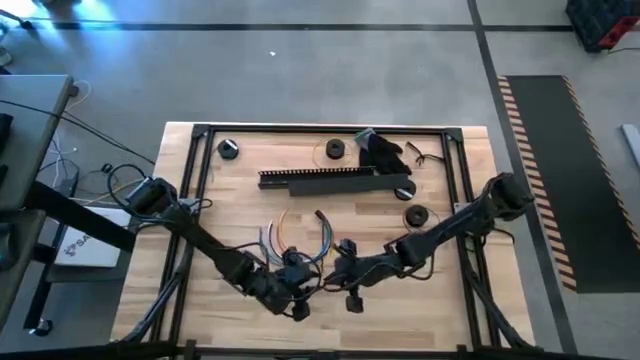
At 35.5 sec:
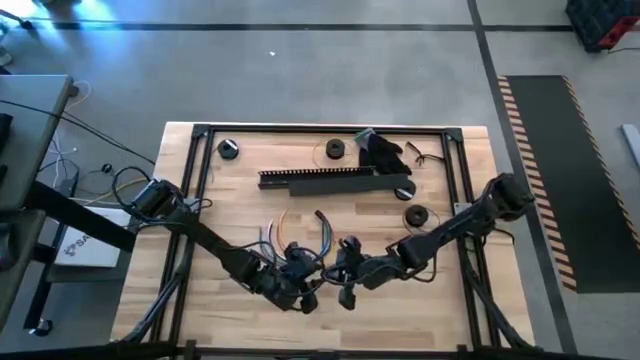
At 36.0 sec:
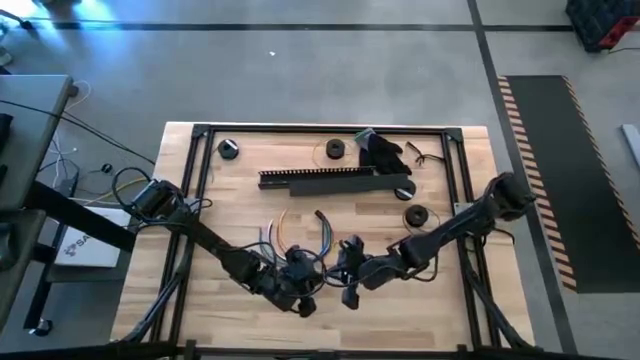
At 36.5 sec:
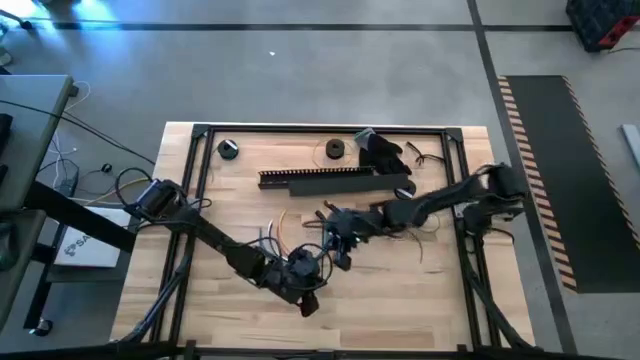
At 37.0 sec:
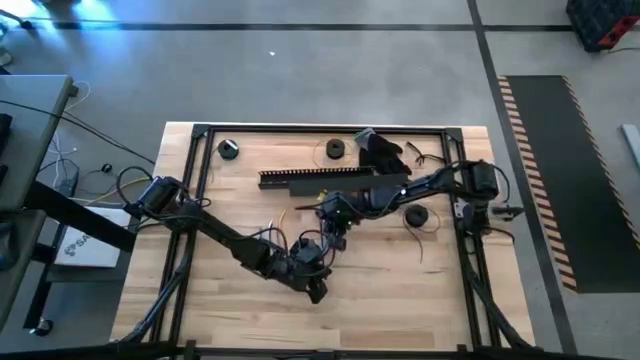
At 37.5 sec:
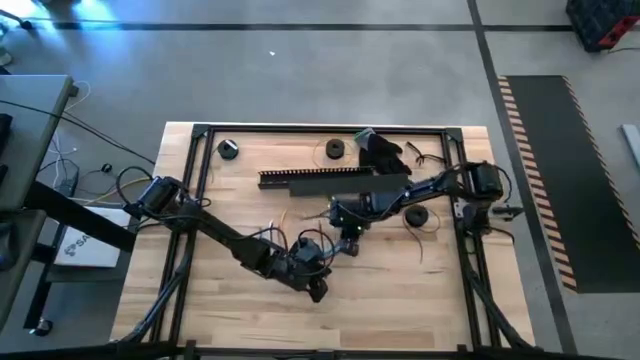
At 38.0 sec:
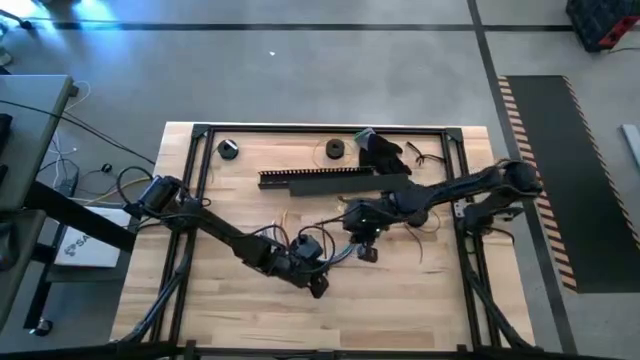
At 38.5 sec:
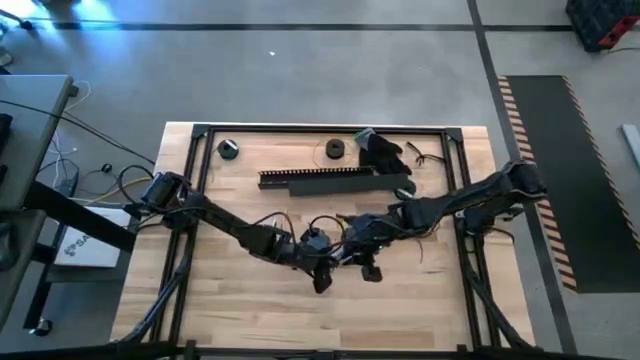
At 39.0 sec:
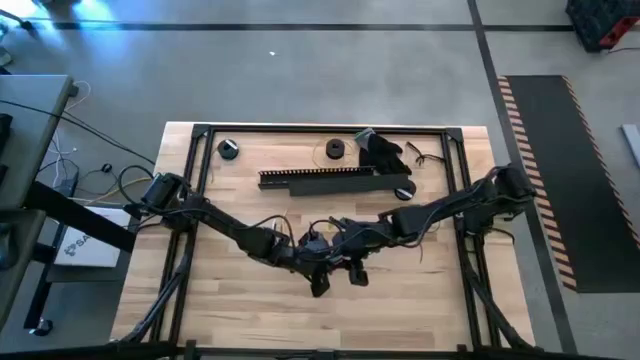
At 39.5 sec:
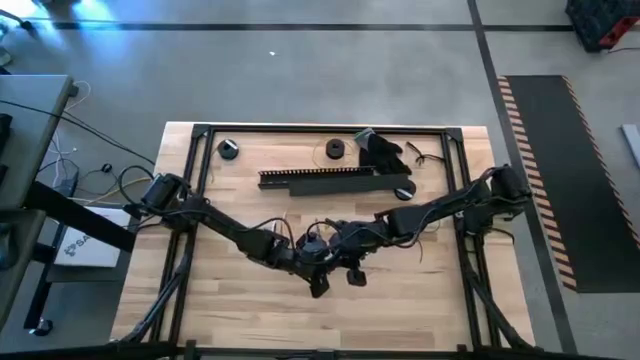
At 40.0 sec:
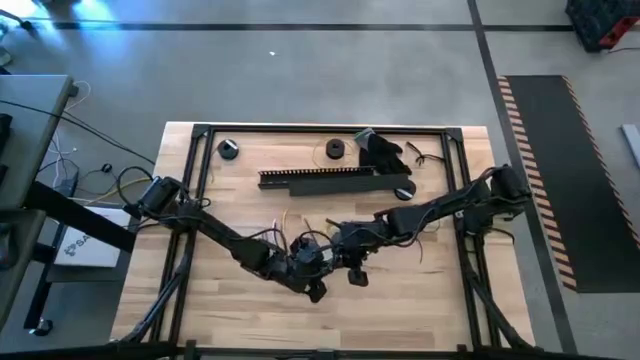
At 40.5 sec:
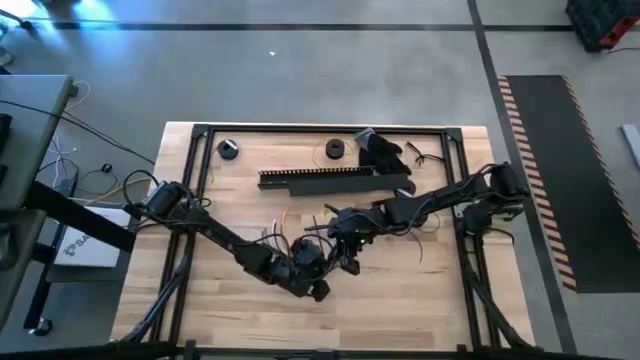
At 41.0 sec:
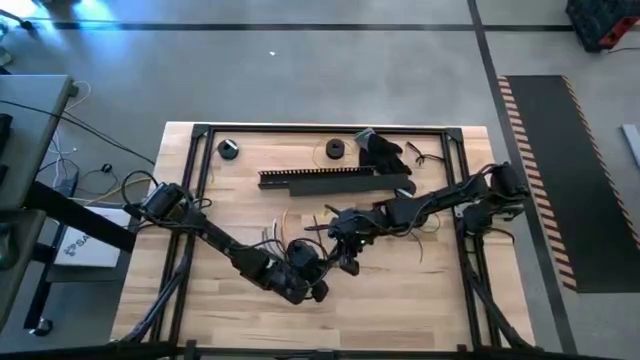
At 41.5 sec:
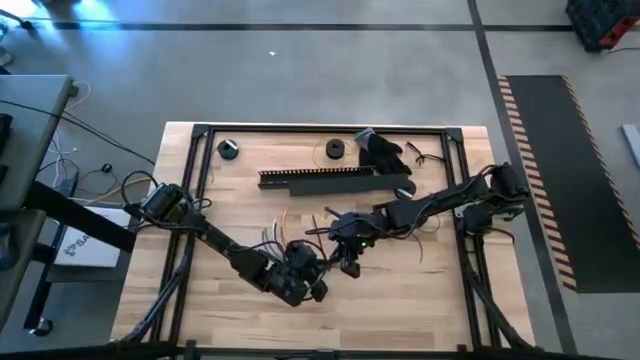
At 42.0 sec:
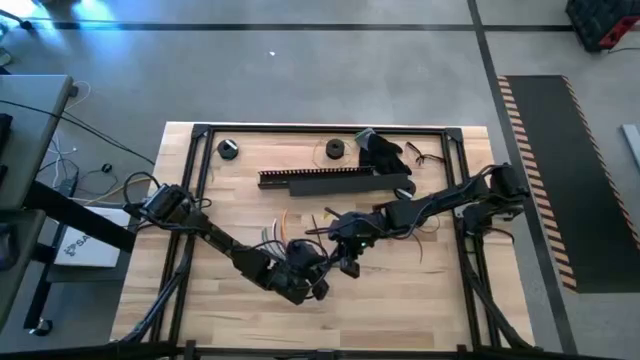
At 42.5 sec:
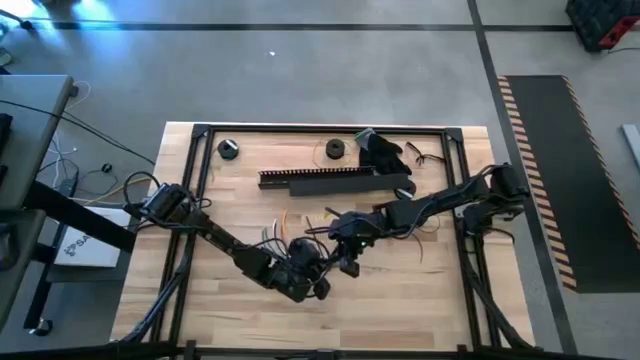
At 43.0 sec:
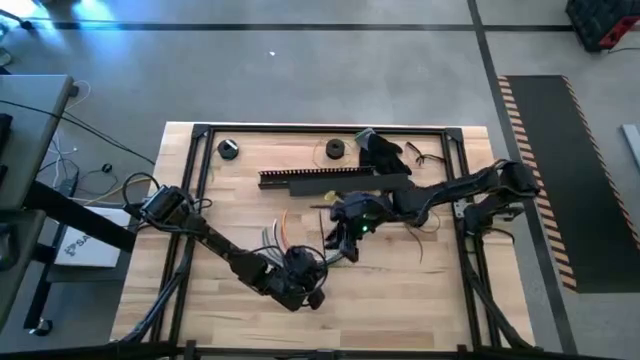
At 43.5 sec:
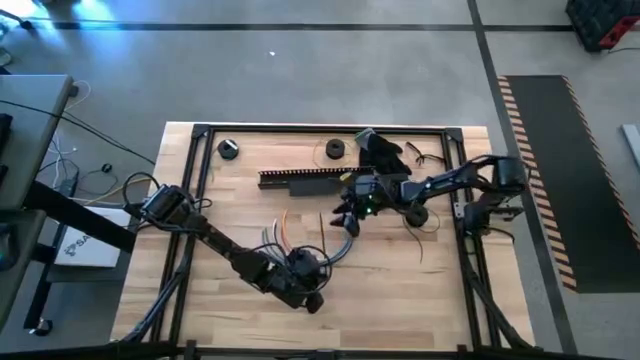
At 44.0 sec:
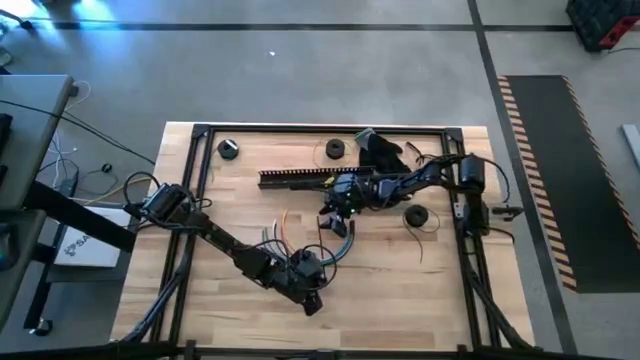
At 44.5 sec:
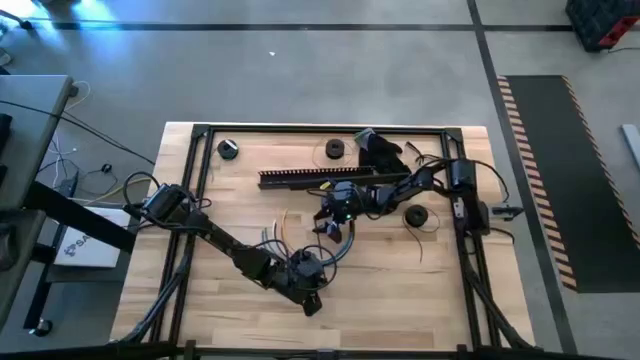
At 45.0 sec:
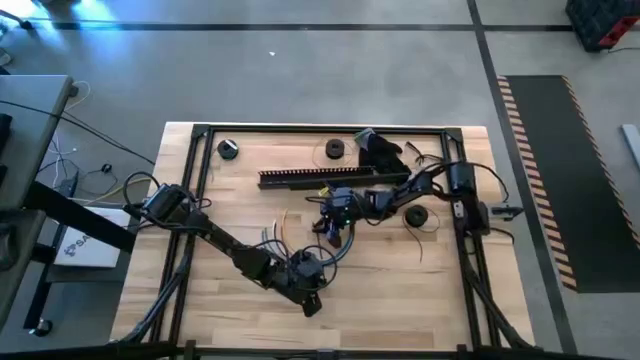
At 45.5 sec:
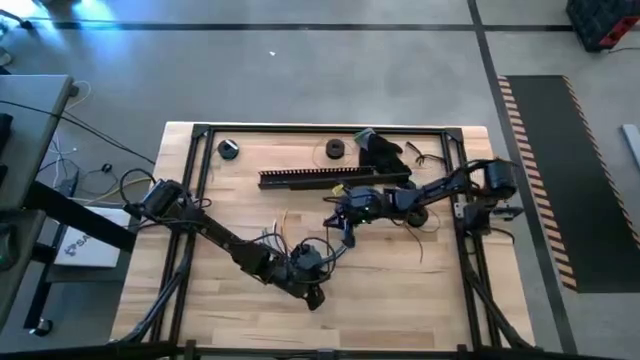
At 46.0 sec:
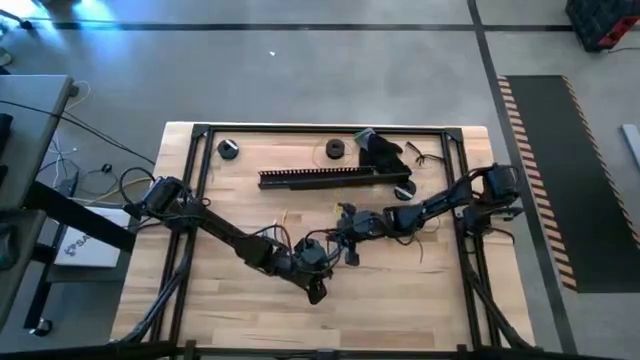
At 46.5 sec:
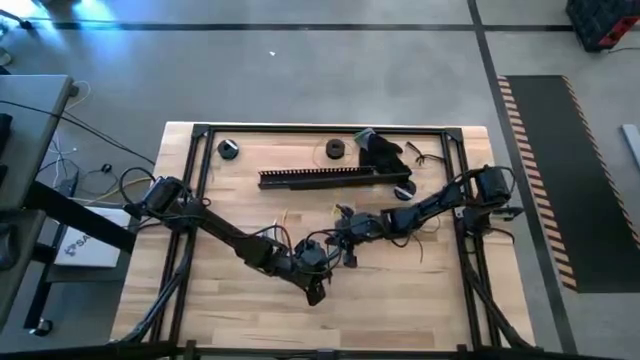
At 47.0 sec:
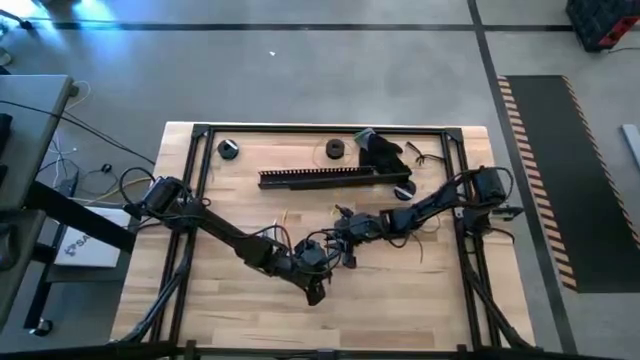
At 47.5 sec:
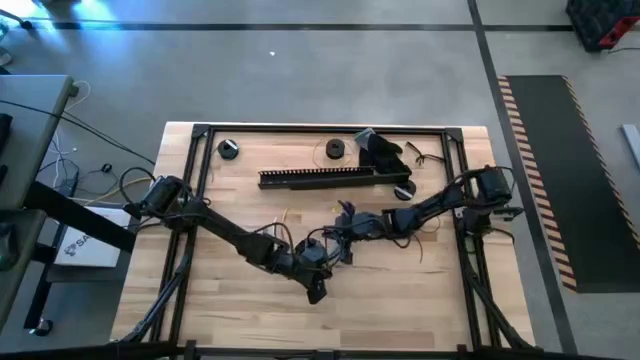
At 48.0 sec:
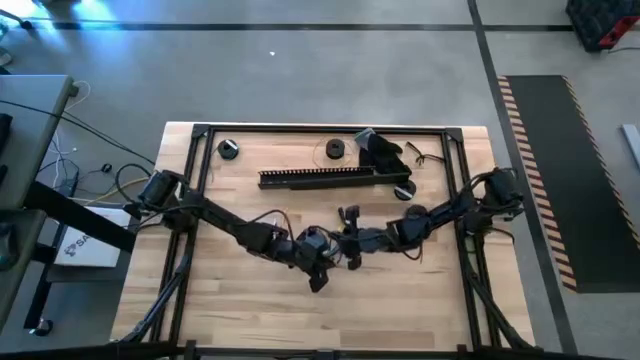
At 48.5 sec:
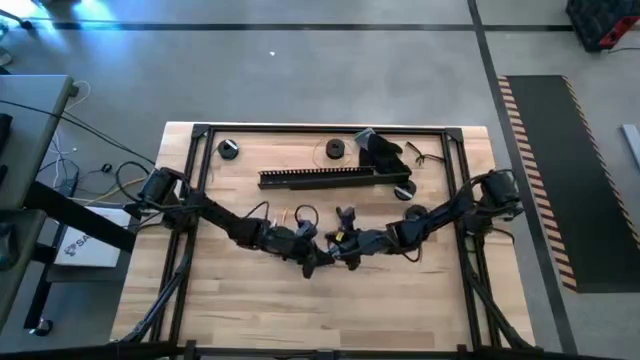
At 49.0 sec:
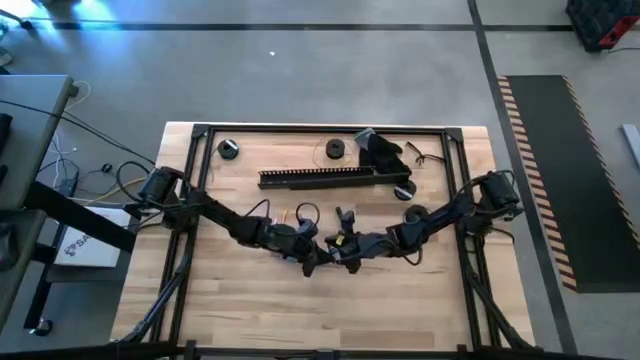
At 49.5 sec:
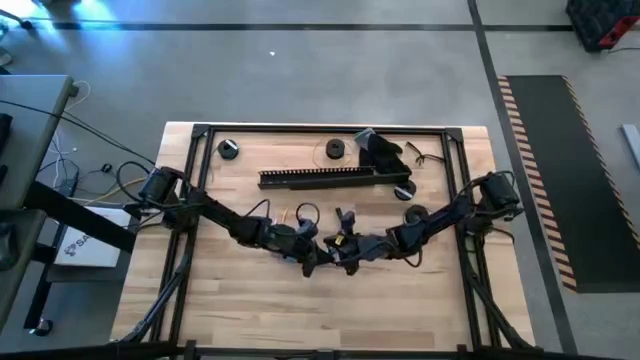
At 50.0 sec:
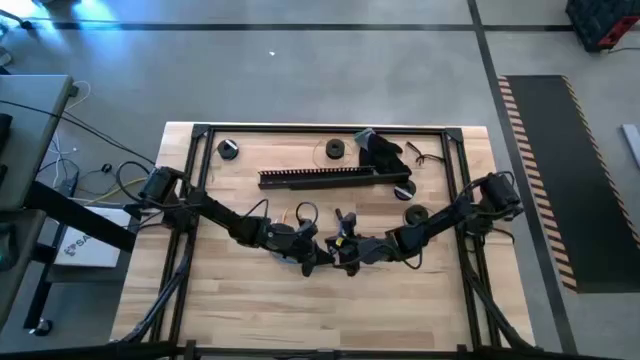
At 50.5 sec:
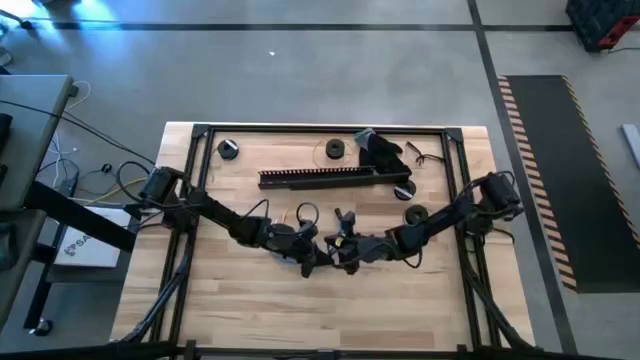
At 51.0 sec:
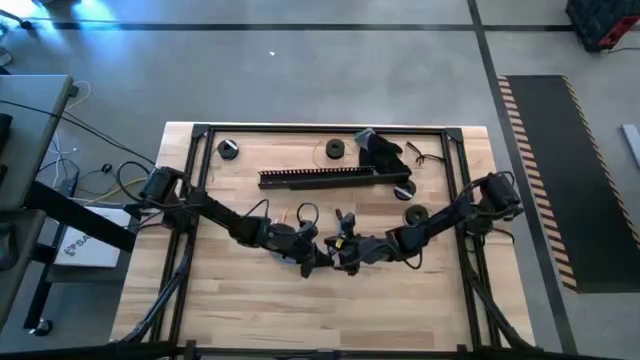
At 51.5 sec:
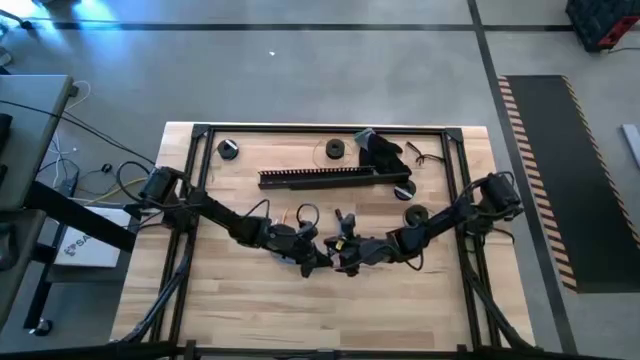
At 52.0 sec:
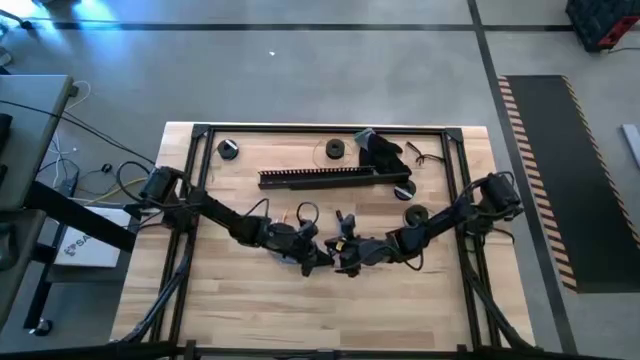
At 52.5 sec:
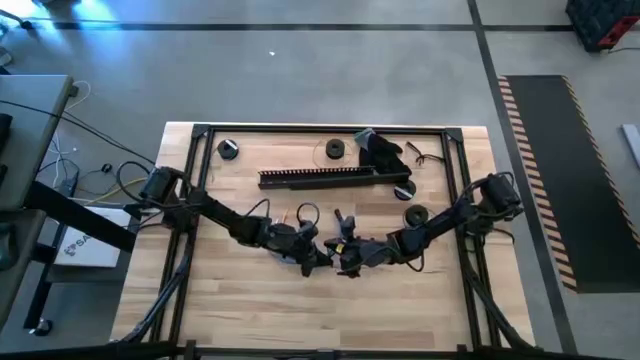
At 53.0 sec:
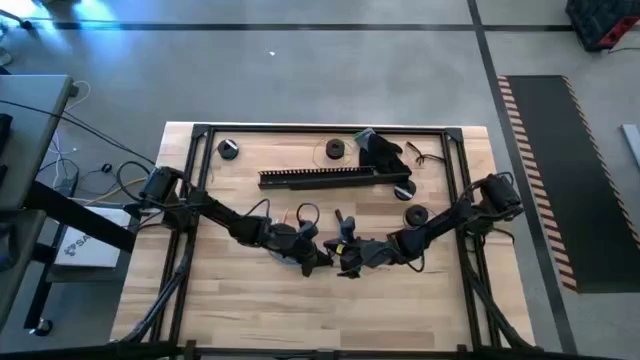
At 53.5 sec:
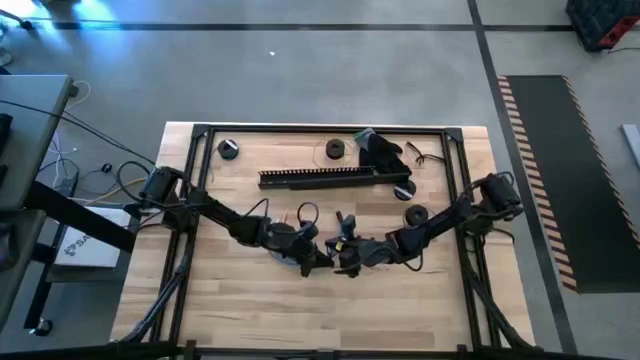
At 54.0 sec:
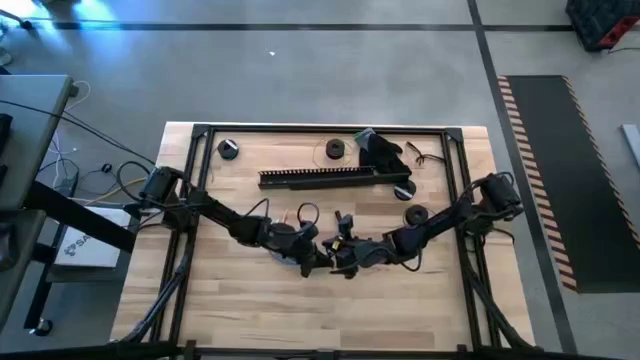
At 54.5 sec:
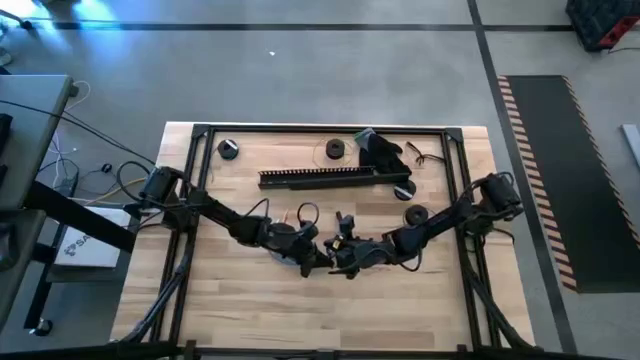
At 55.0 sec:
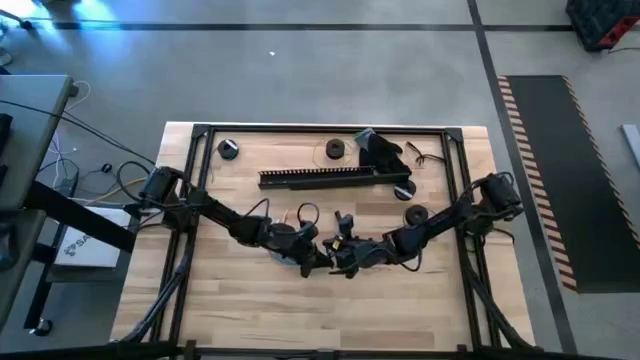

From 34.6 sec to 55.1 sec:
Task: Ziptie cables
Wrap the black zip tie around the cables

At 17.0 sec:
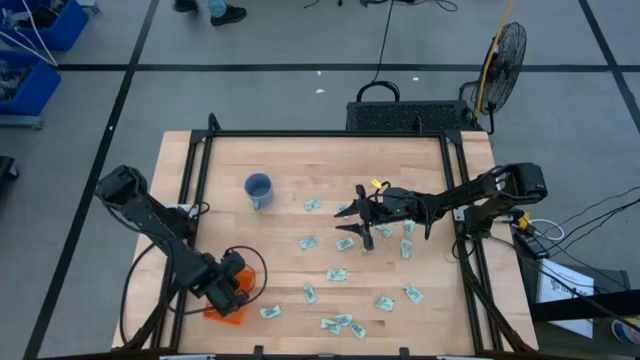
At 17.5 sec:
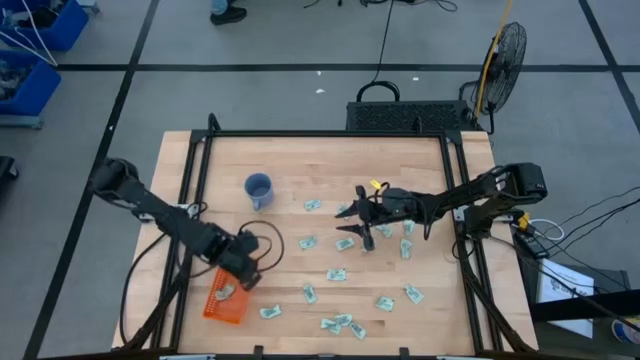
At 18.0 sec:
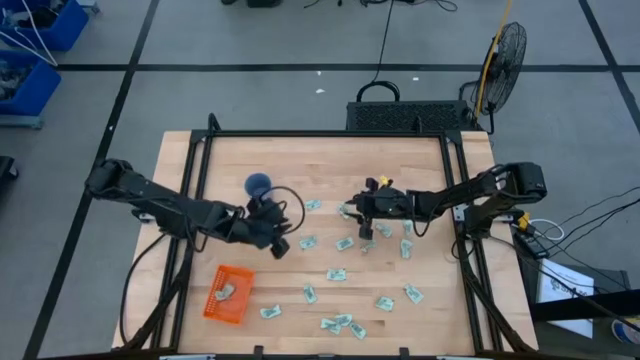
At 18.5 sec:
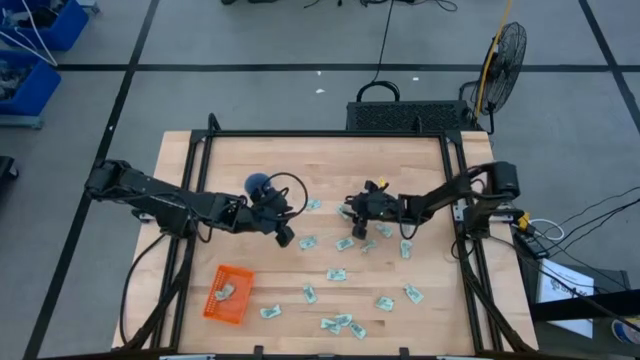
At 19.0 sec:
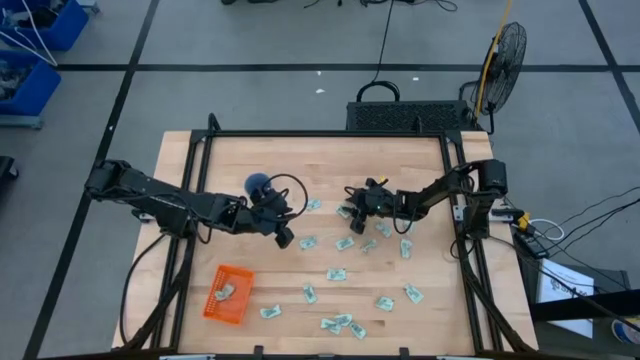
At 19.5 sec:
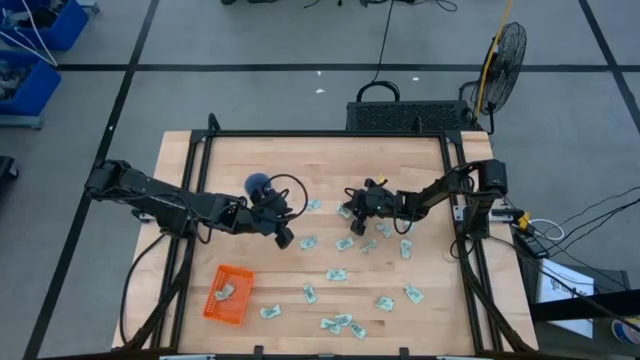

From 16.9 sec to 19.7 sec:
Task: Pick and place Stevia / Truvia into bins
Put the stevia packet into the orange bin
